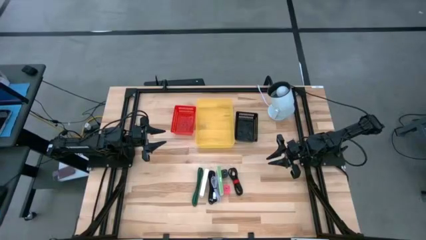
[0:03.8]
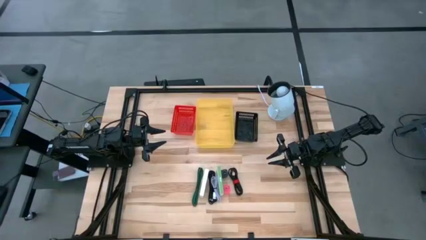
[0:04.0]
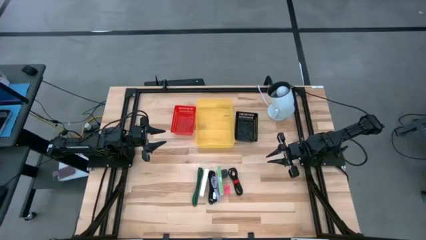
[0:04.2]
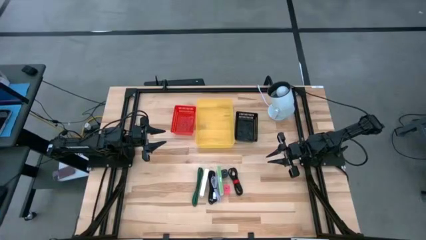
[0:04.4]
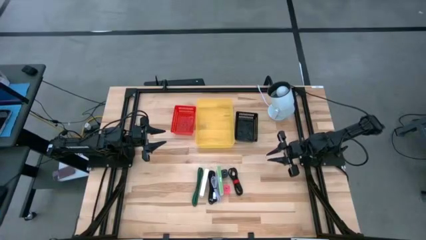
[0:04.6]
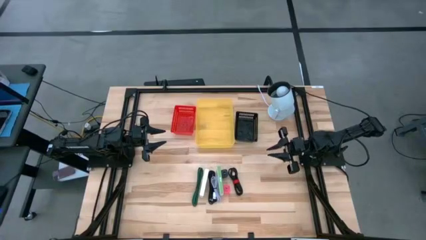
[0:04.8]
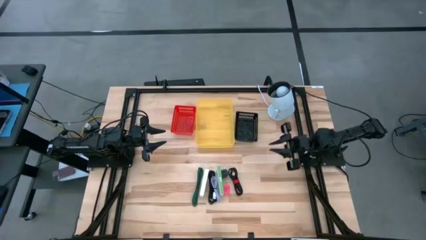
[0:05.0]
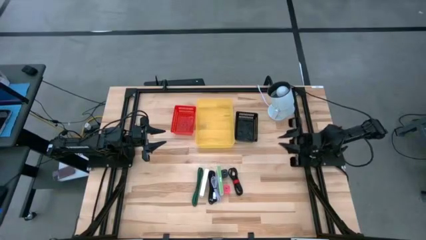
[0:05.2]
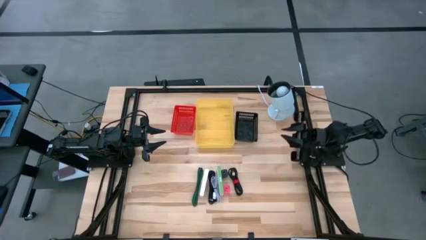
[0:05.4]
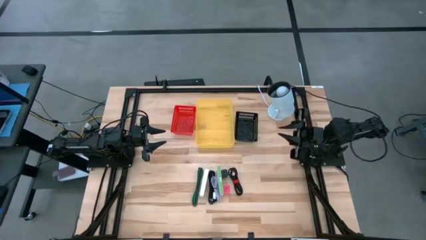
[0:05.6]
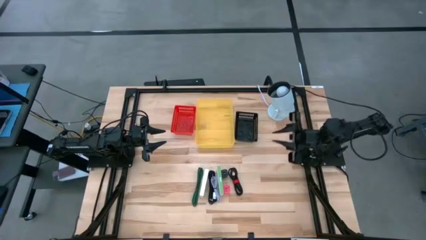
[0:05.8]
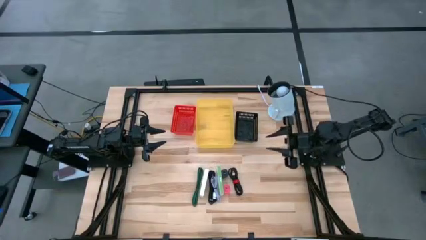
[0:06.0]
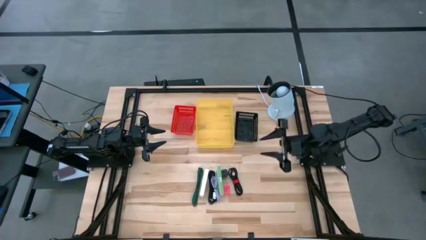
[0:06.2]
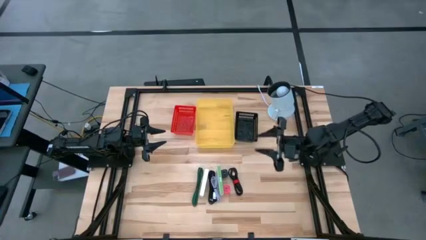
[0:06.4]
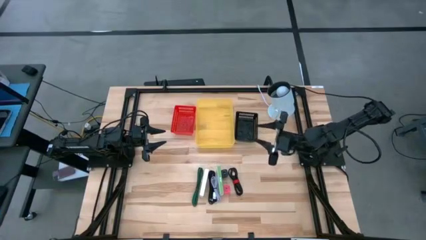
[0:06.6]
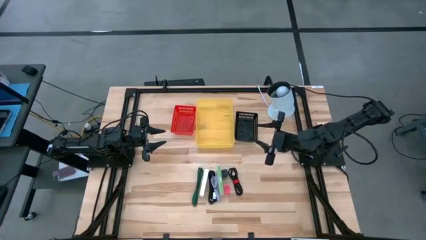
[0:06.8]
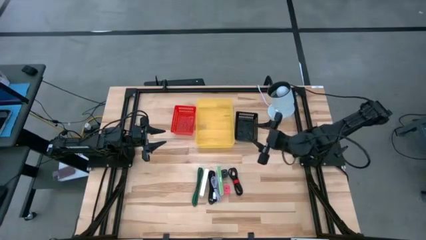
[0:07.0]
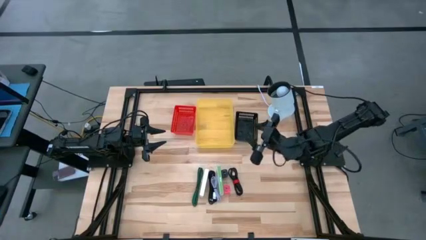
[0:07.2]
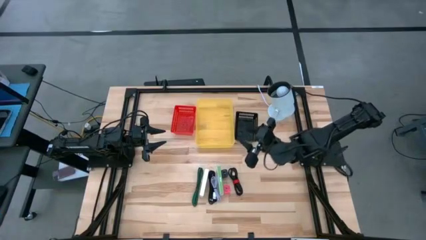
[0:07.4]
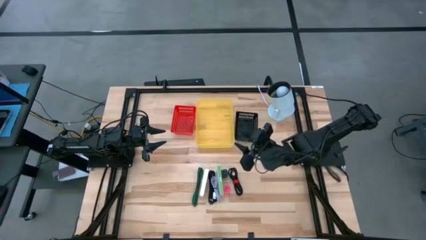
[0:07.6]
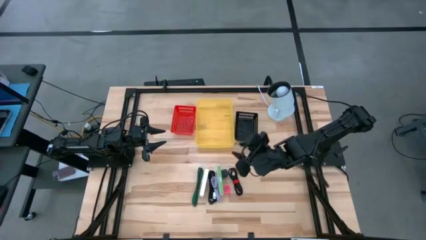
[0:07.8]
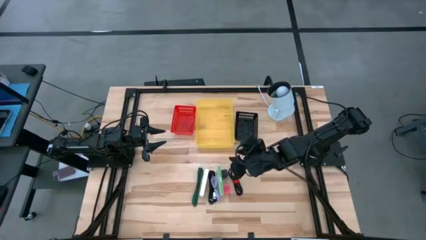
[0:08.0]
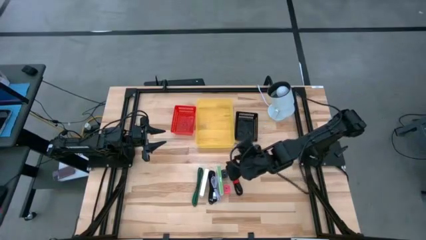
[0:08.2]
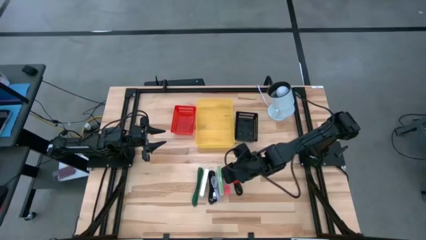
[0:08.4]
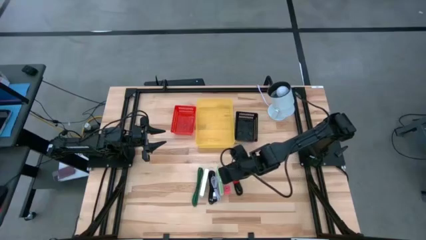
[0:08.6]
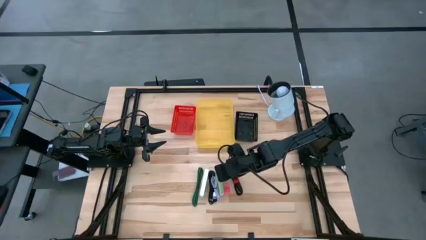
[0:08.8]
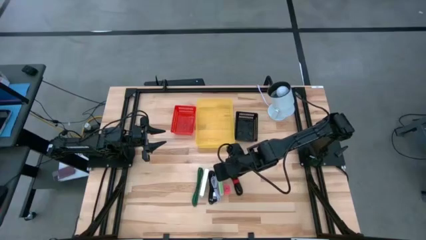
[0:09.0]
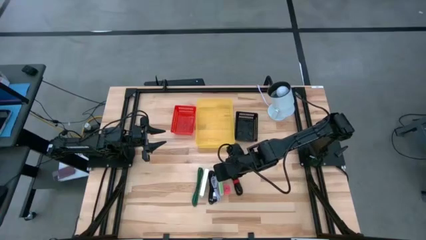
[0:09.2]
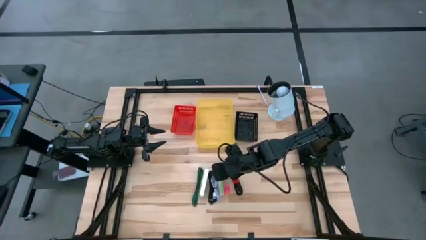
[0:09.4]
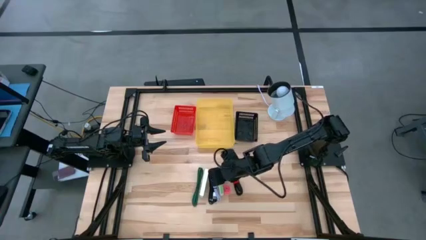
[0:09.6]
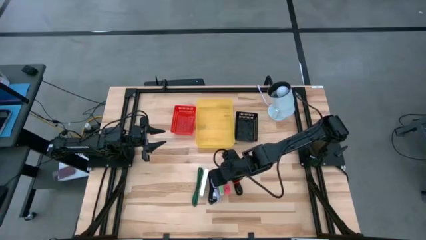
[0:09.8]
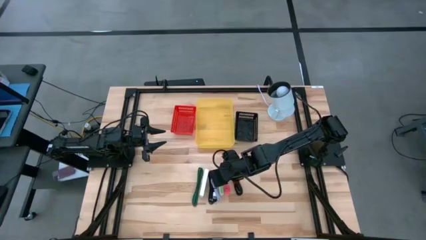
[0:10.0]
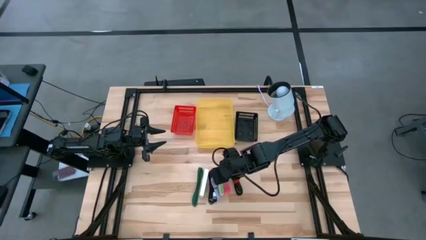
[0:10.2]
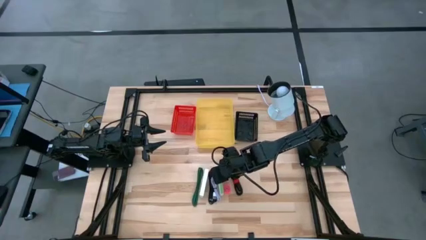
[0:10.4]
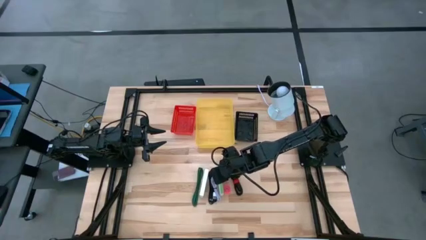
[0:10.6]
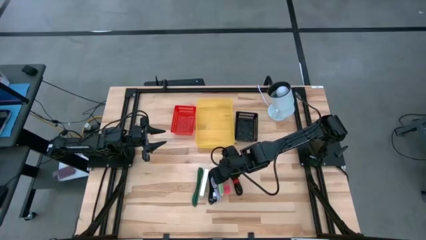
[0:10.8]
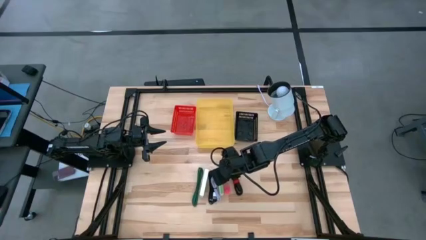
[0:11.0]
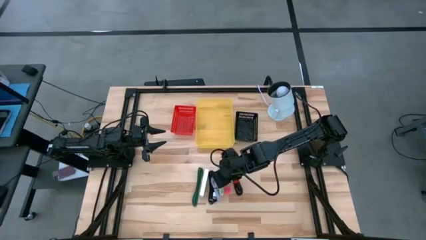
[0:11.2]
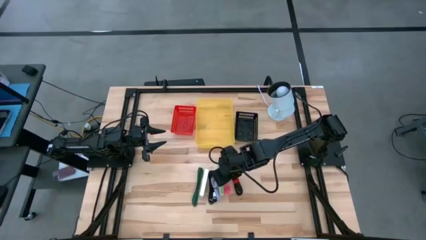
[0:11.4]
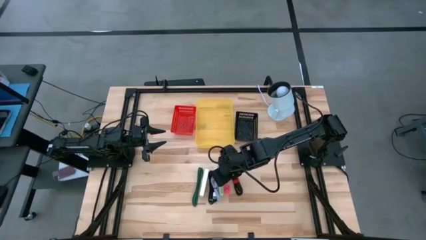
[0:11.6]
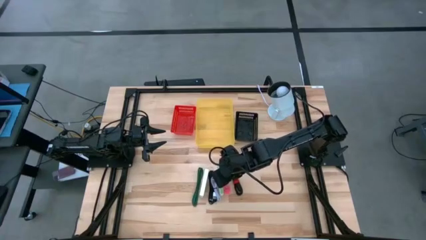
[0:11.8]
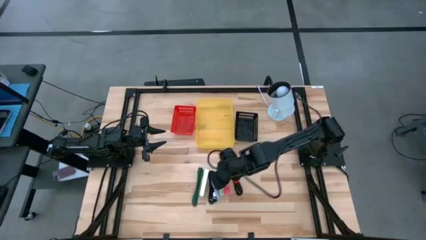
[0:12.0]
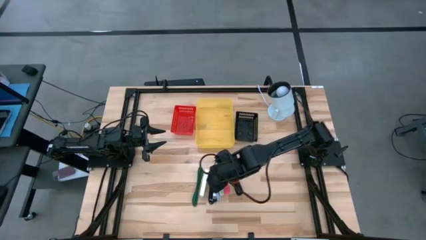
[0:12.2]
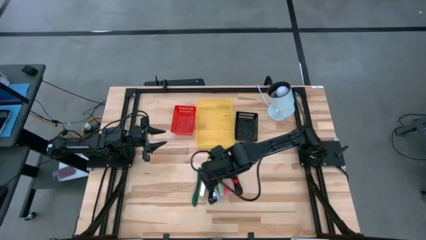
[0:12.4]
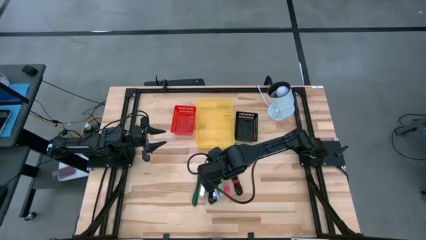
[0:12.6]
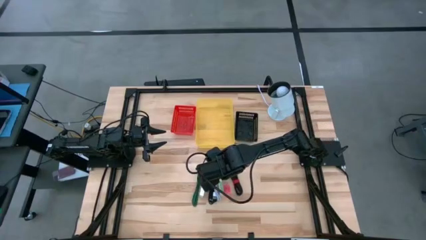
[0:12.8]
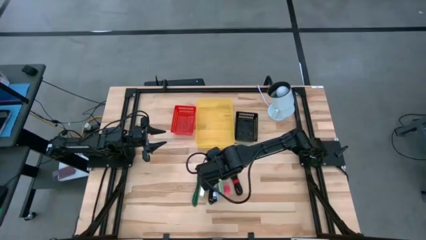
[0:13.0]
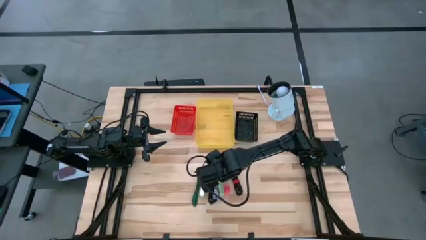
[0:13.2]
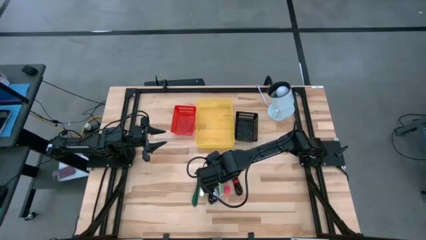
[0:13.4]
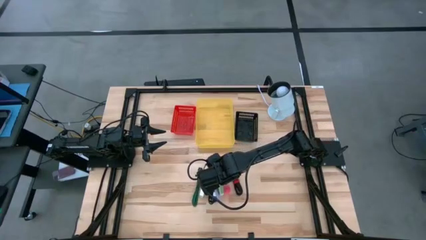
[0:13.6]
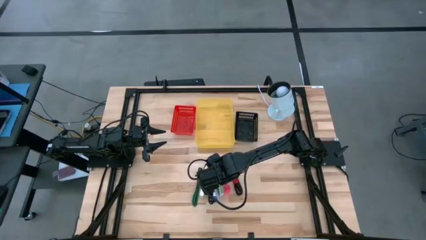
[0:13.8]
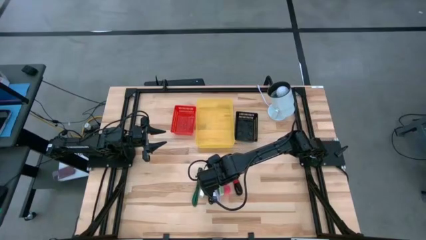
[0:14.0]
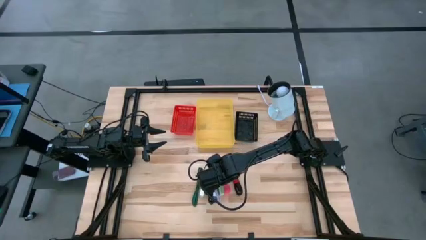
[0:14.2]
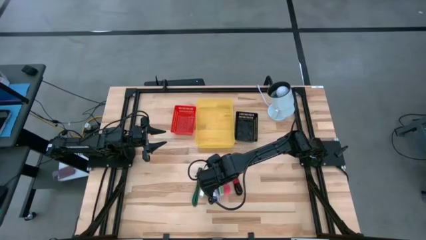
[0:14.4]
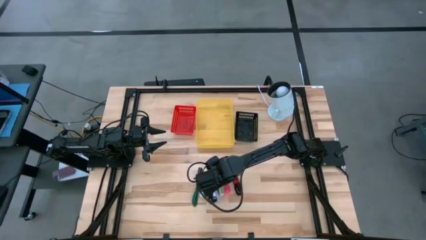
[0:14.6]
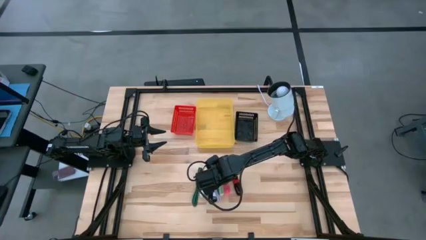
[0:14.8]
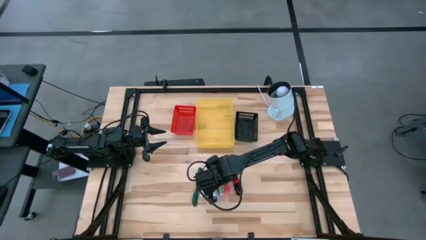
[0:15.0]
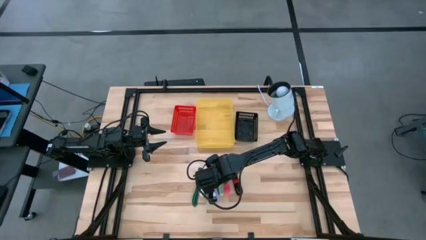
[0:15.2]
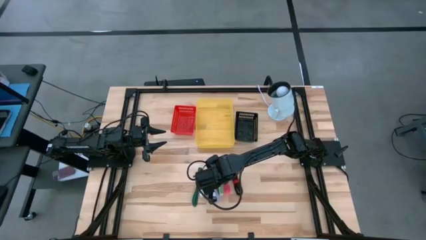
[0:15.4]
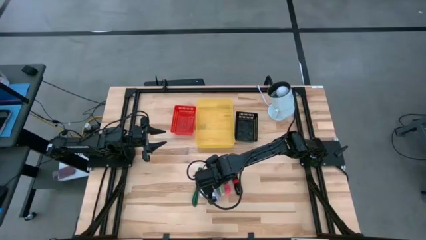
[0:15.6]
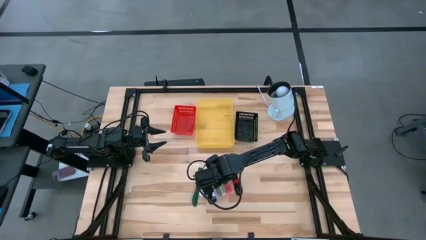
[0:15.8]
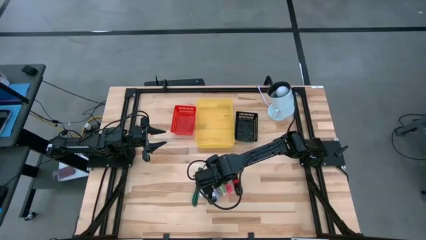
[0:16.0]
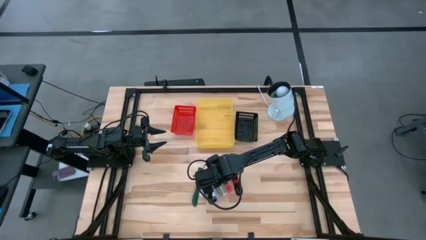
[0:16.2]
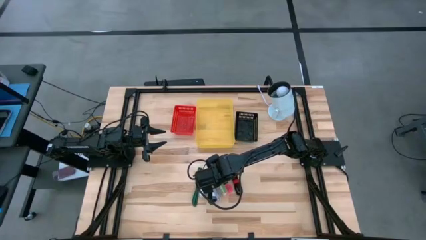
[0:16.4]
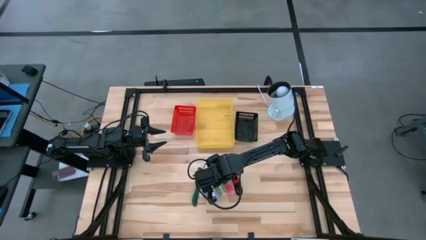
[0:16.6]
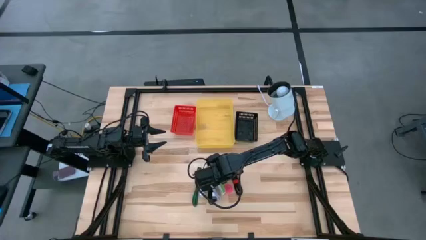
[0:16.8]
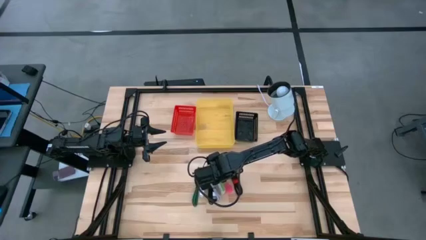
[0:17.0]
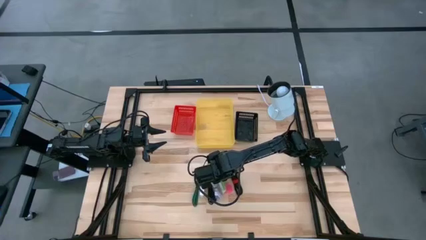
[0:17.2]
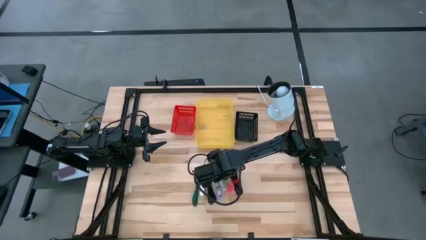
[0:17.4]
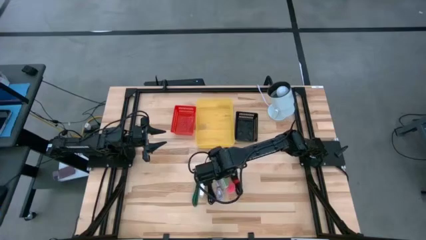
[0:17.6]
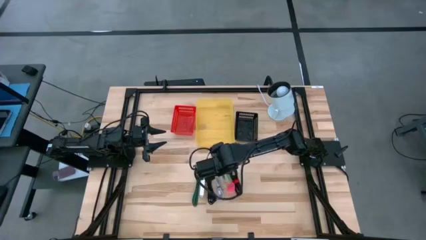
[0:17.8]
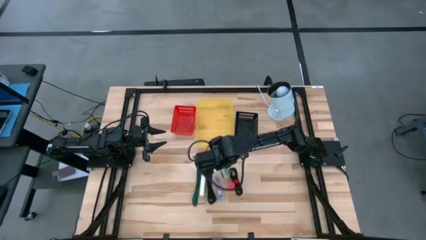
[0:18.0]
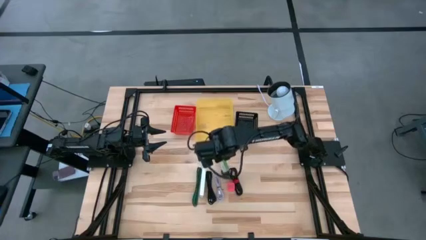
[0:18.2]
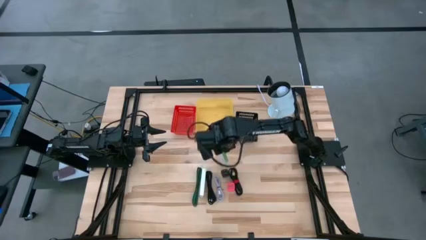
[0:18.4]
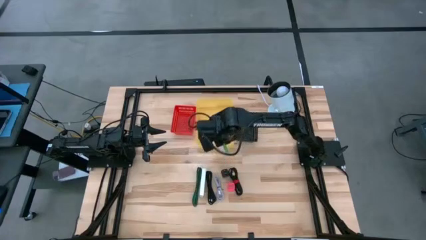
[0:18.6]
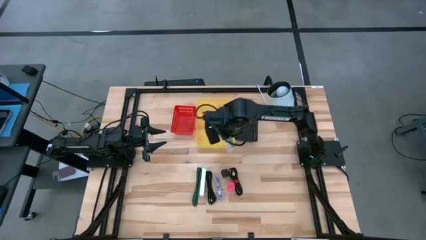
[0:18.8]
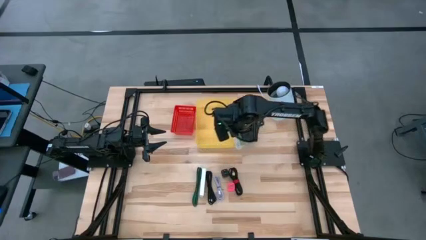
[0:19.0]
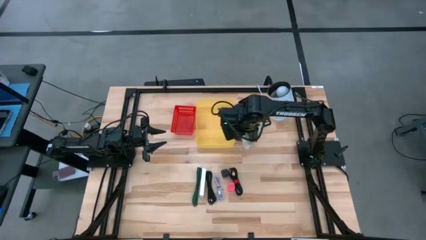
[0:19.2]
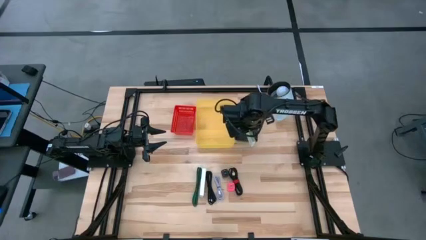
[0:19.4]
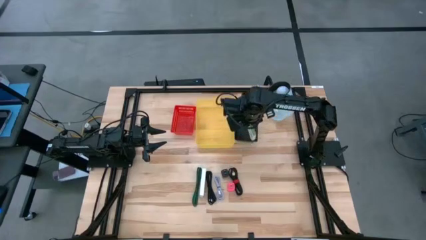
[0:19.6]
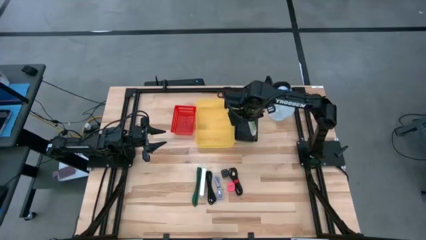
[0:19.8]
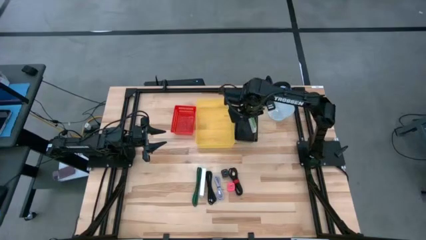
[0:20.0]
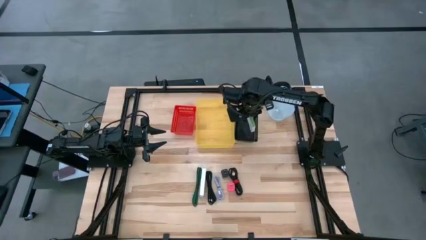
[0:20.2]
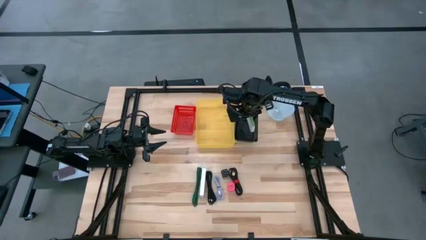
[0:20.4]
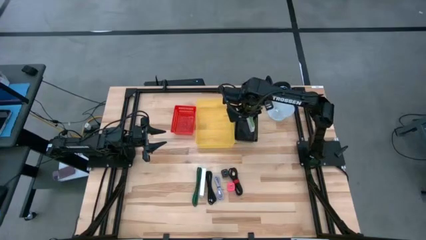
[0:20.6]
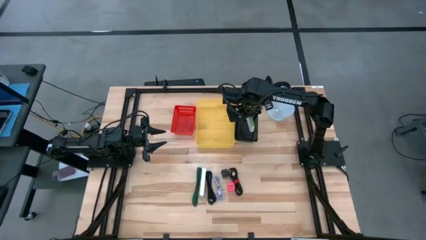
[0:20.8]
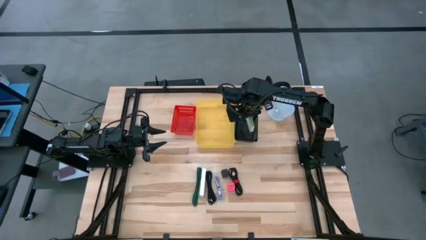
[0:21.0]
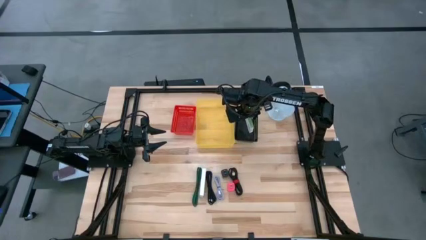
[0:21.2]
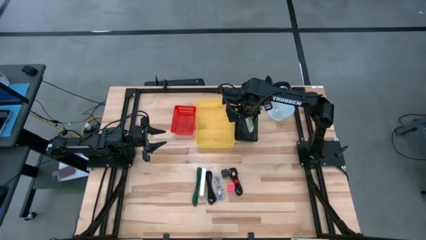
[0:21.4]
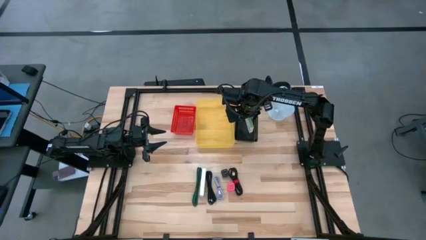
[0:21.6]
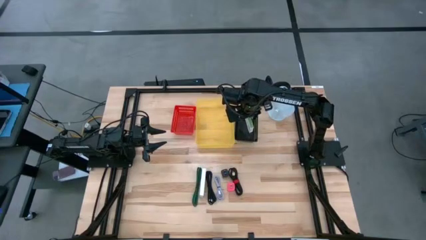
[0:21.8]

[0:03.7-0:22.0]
Task: Pick and place items into bin
Put the right white card reader box into the black bin
